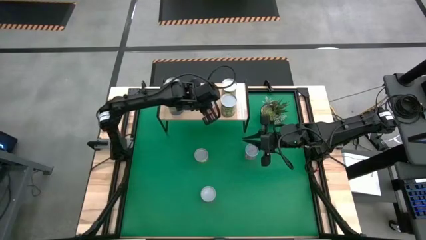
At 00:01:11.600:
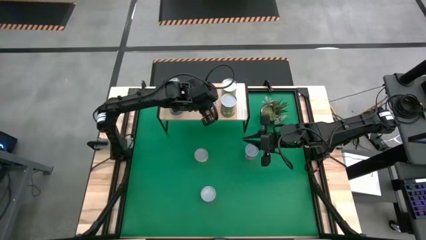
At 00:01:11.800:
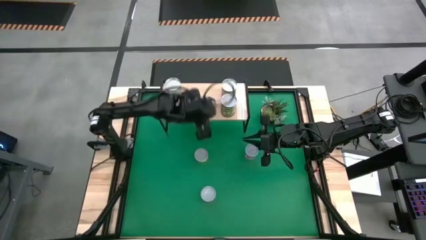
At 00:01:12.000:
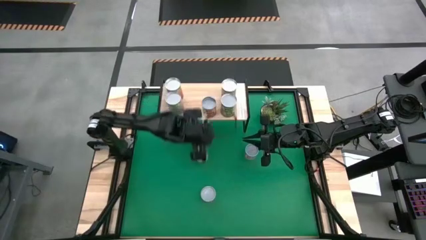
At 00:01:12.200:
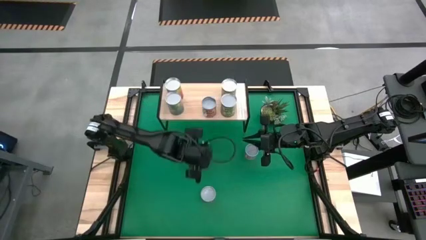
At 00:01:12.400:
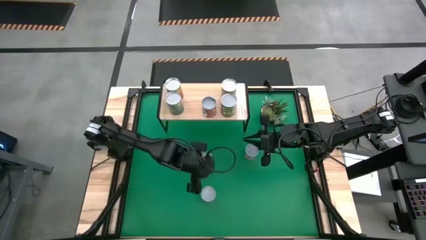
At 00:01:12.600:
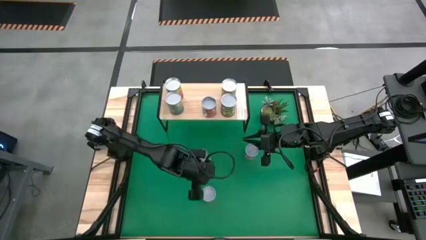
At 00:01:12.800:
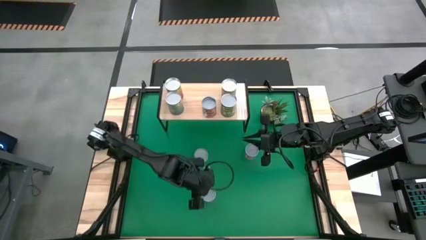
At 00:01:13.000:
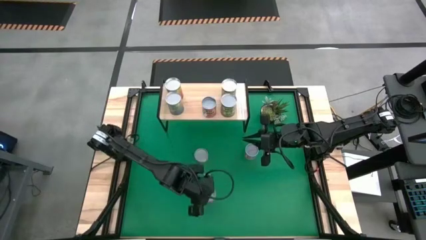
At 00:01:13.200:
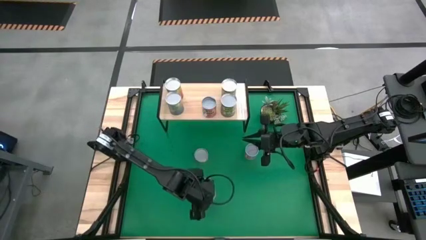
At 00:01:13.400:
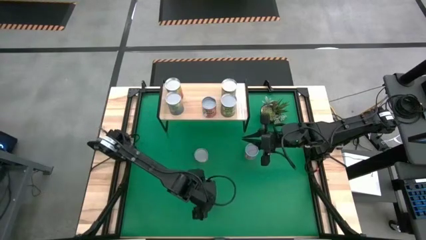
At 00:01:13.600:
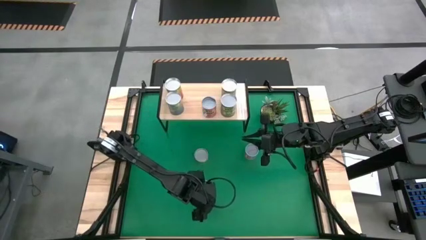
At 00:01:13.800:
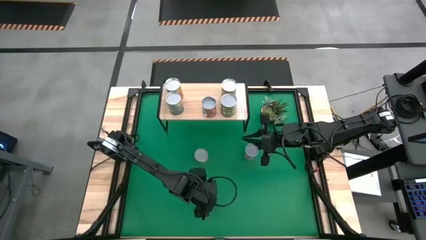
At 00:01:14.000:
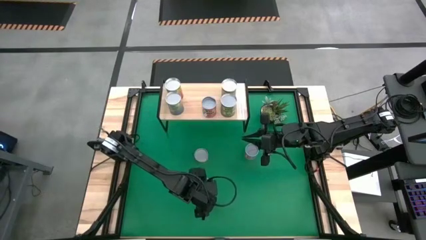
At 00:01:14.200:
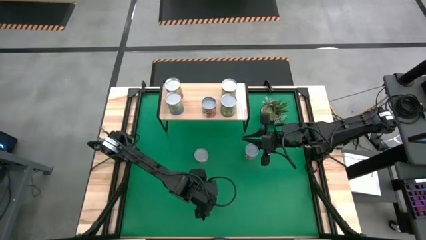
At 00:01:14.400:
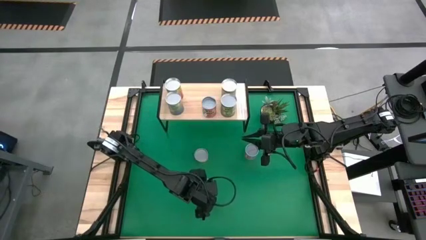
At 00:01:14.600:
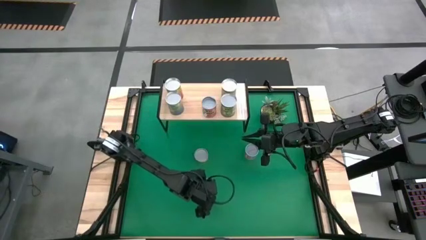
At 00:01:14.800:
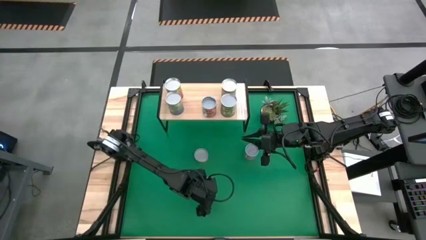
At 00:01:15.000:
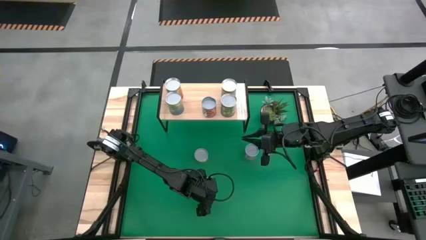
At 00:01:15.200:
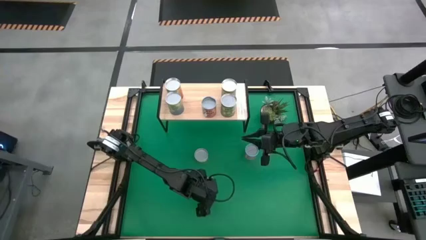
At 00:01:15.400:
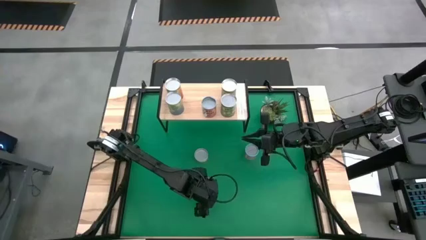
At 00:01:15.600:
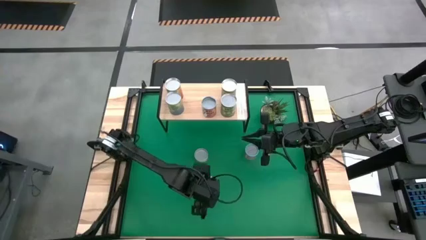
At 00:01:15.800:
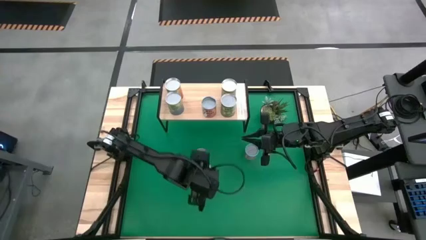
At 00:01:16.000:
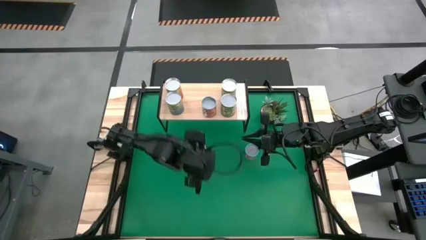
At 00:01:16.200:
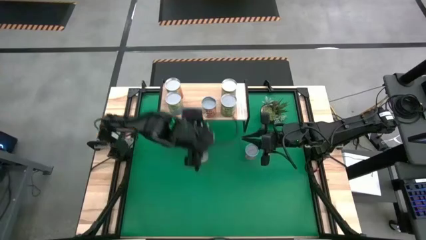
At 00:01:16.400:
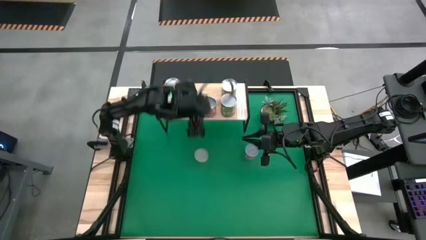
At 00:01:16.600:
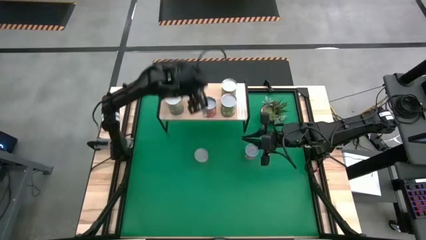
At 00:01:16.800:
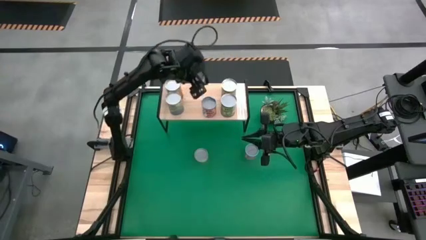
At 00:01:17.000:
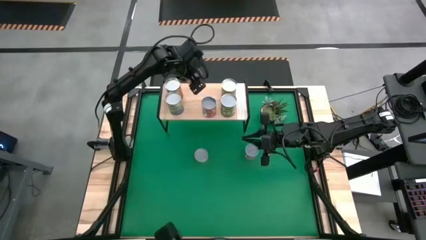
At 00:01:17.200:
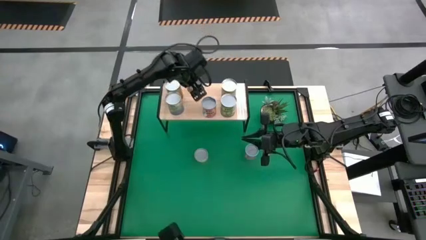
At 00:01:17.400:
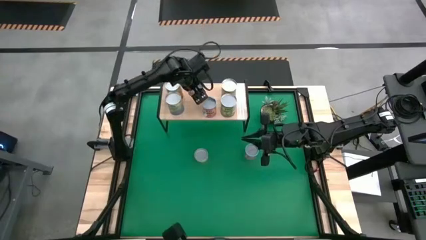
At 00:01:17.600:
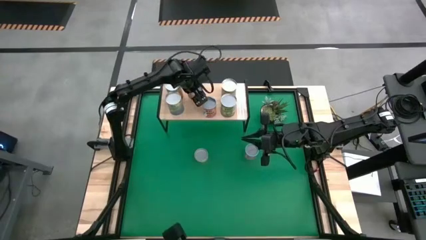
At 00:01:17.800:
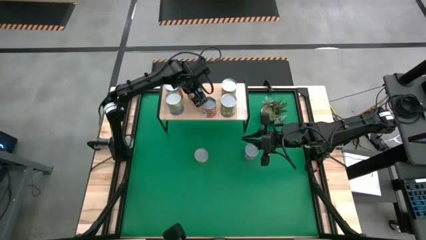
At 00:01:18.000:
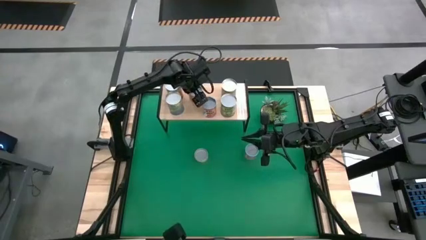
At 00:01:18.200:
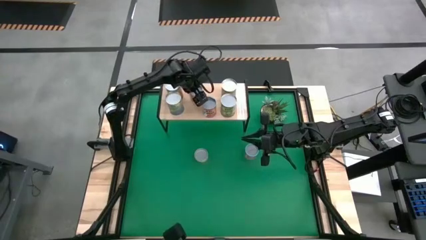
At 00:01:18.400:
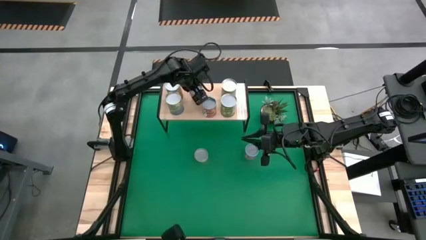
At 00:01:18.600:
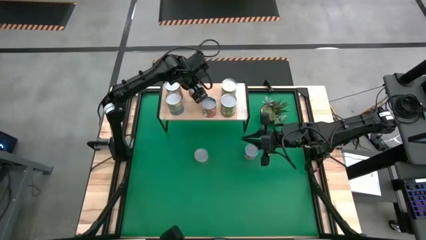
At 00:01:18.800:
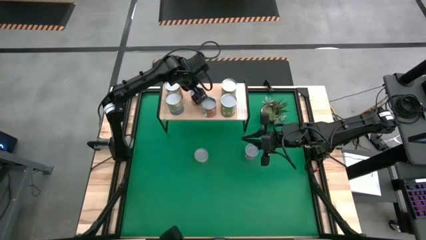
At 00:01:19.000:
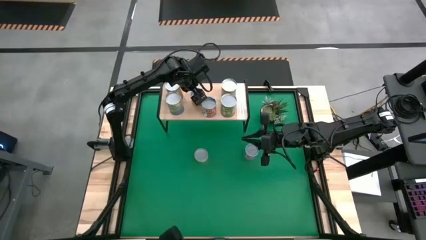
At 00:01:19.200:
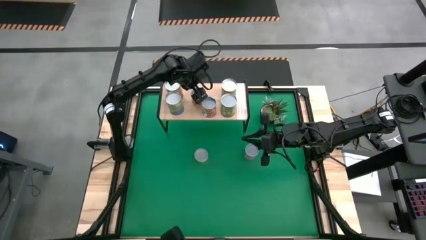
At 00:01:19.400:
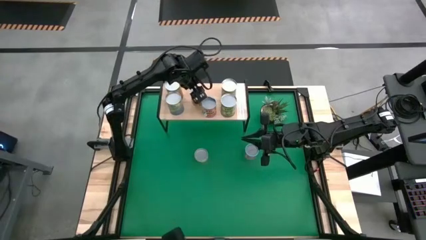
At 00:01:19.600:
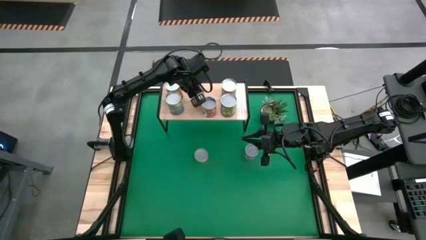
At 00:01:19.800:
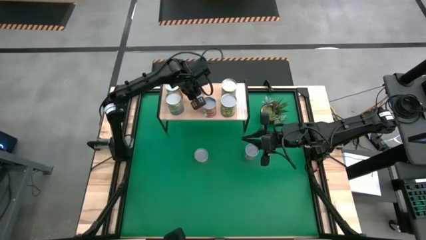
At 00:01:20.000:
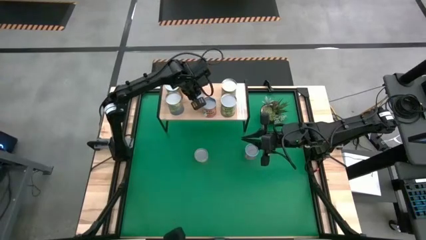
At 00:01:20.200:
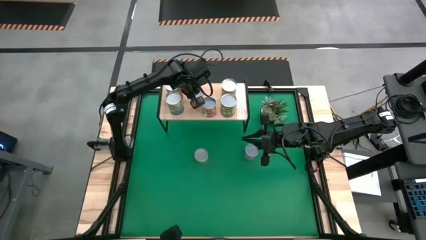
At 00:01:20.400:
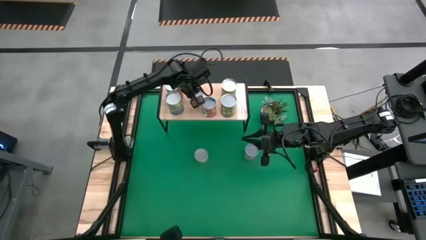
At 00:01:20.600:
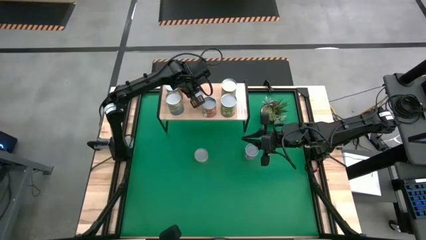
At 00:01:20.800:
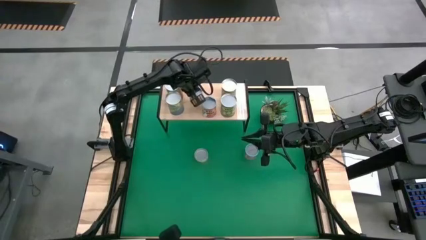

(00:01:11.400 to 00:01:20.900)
Task: Pick and place cans onto a shelf
Put the small yellow can on the shelf
